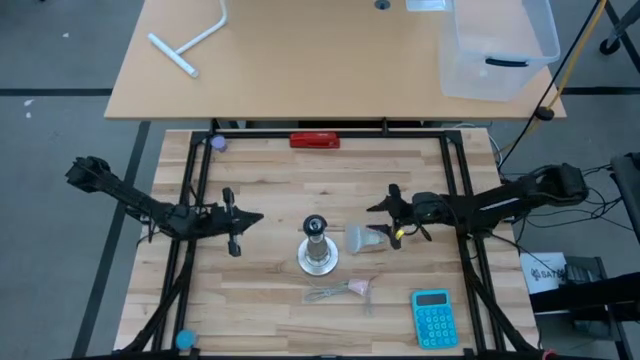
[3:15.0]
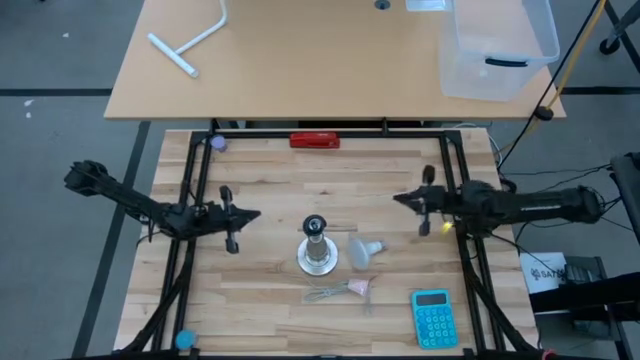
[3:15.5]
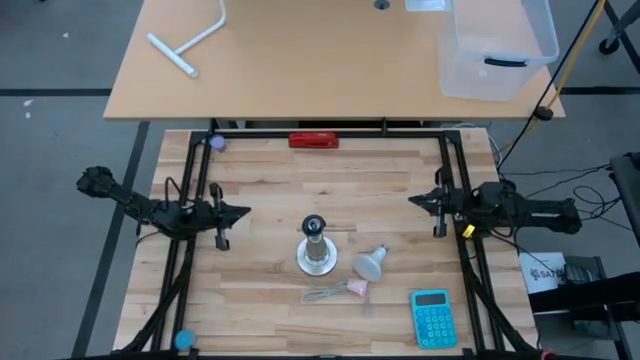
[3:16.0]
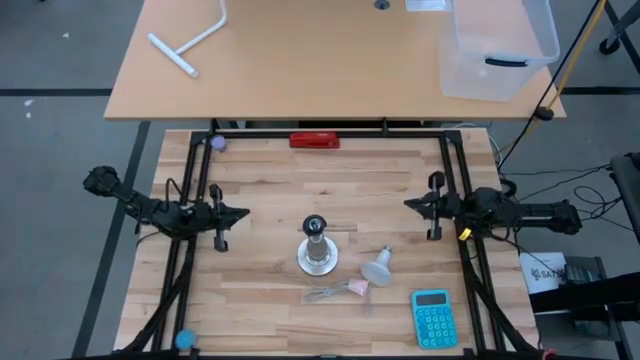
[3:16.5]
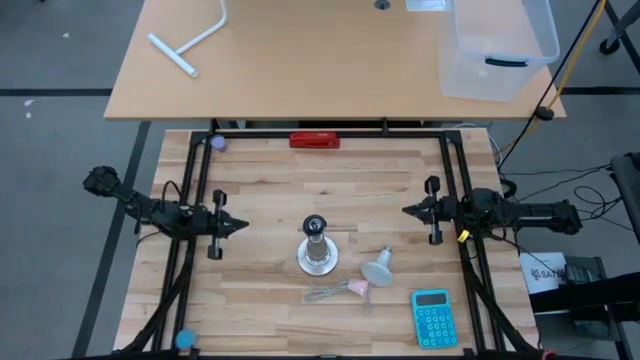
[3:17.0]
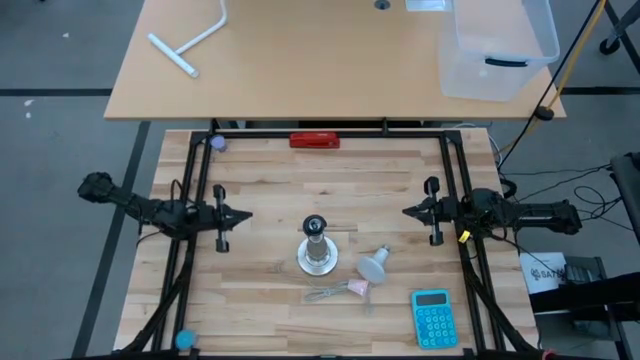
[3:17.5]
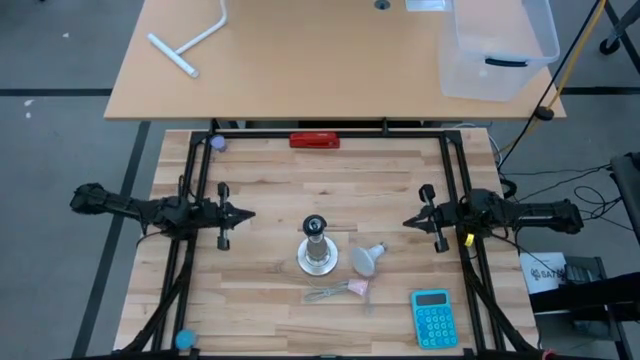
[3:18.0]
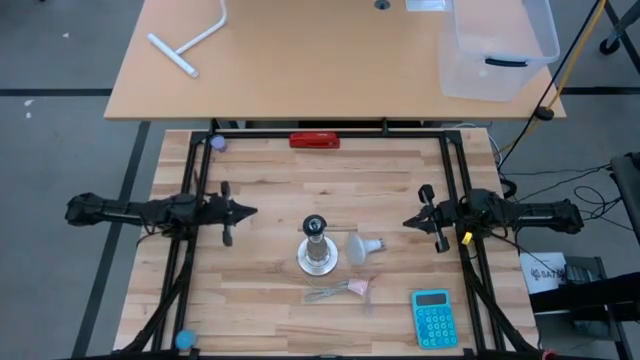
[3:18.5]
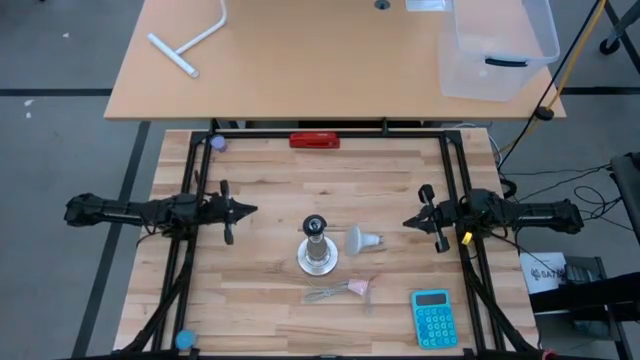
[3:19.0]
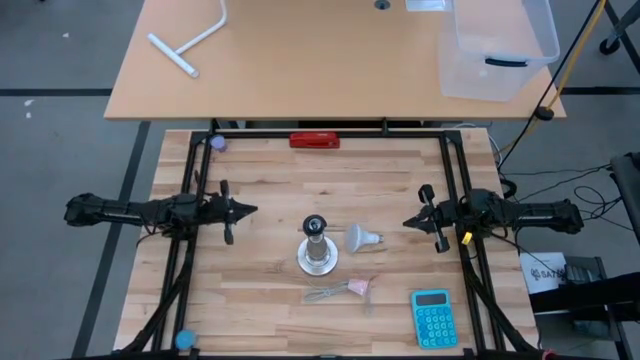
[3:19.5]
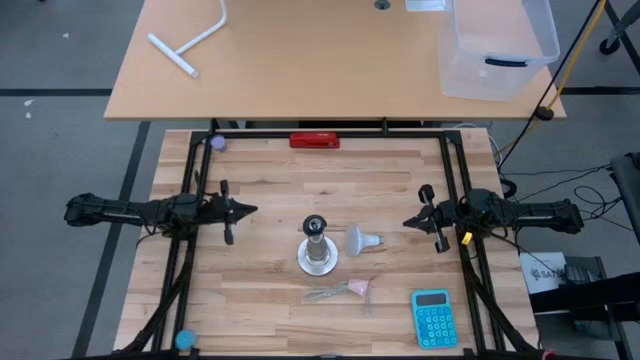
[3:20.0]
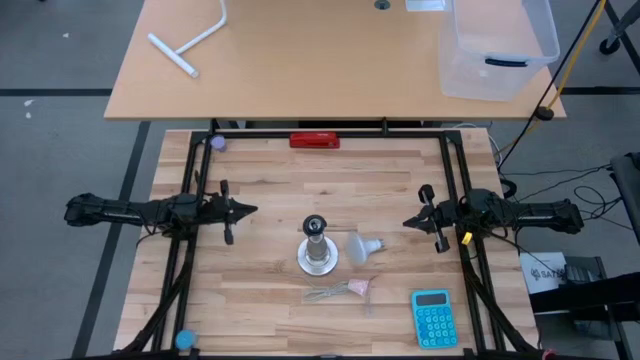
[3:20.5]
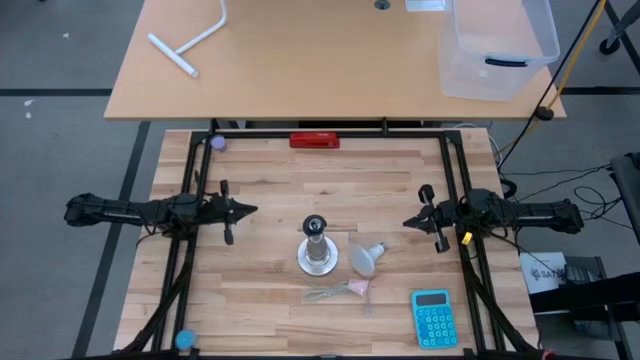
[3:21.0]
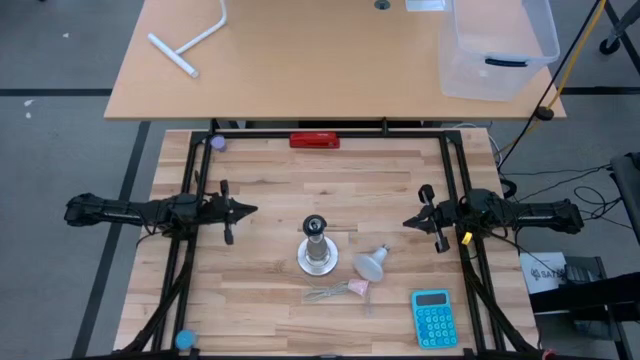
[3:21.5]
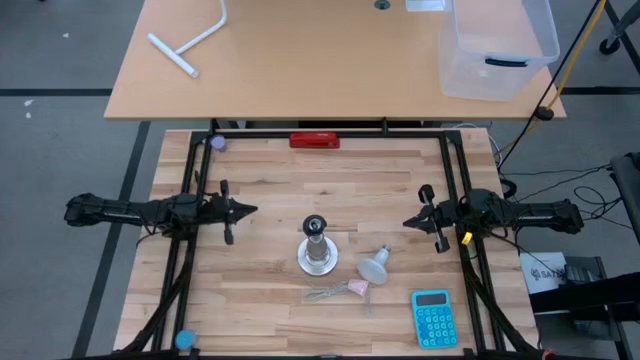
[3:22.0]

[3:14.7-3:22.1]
Task: Screw lightbulb
Return to Home Position

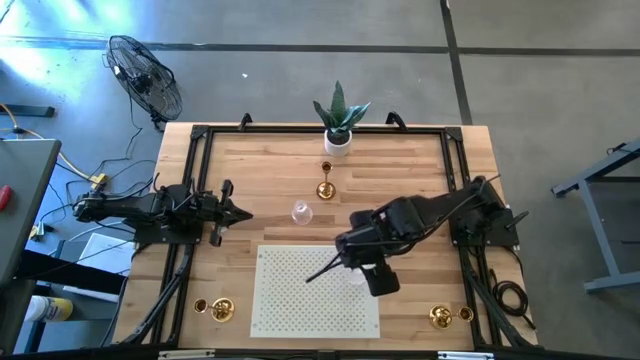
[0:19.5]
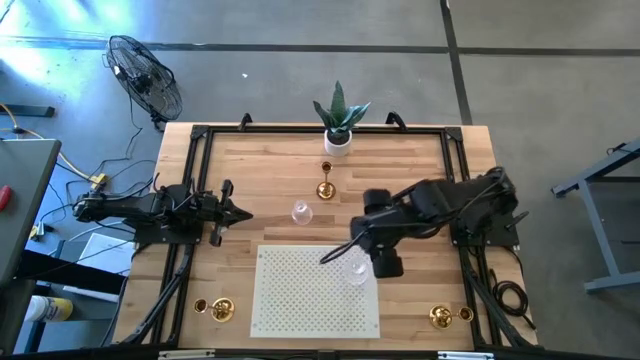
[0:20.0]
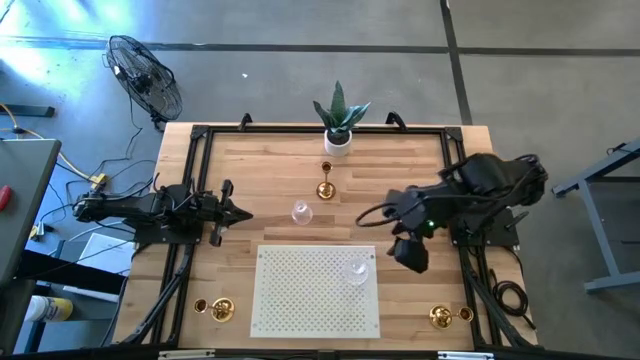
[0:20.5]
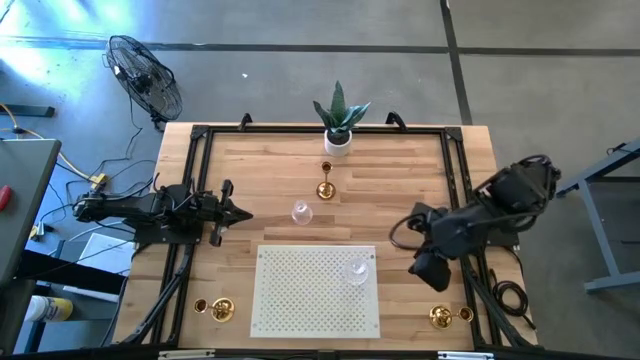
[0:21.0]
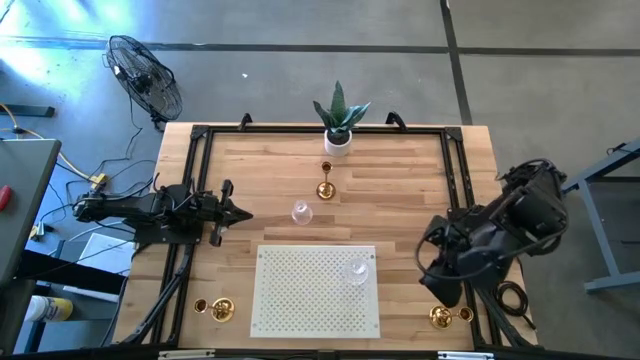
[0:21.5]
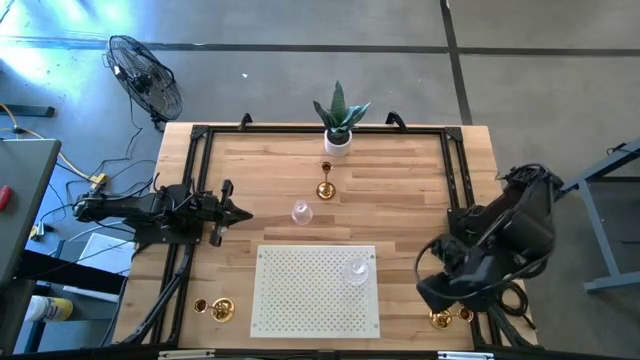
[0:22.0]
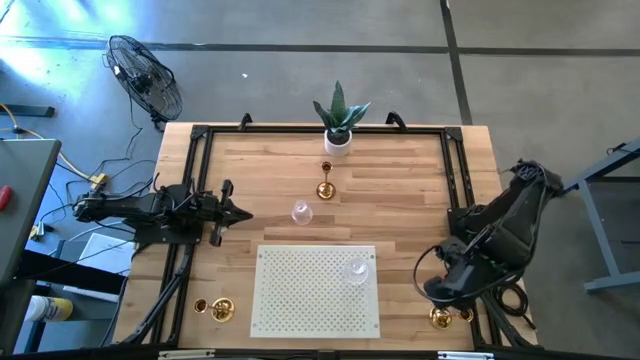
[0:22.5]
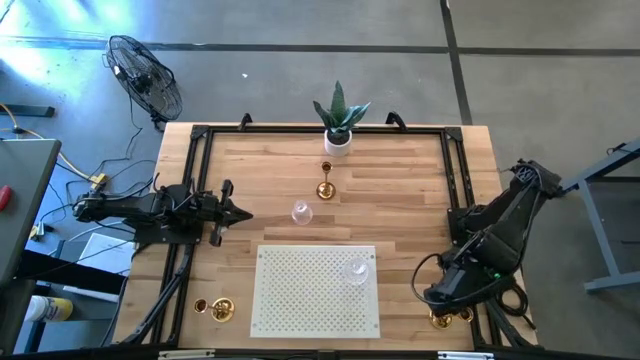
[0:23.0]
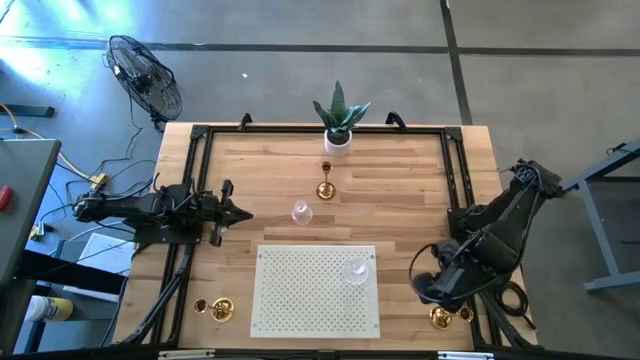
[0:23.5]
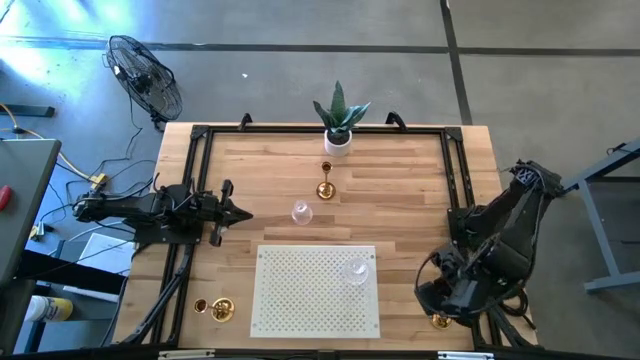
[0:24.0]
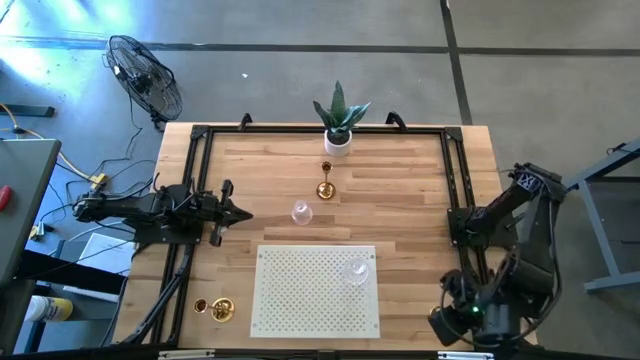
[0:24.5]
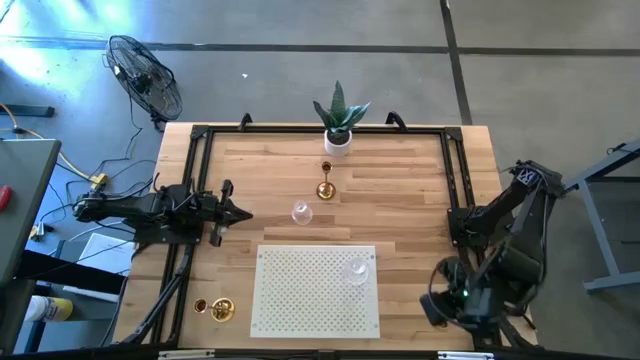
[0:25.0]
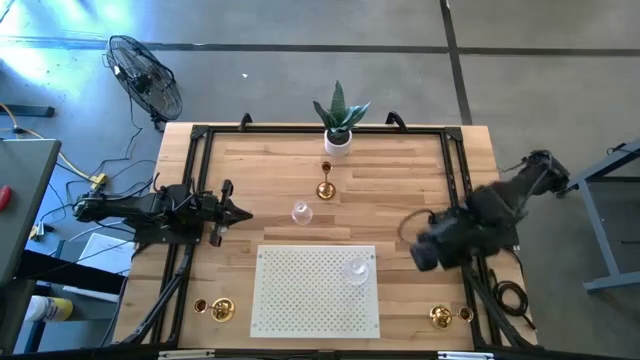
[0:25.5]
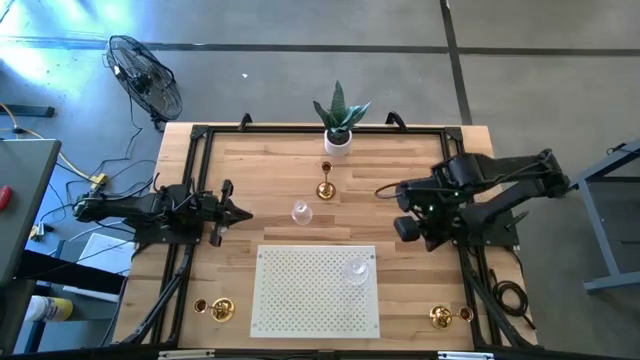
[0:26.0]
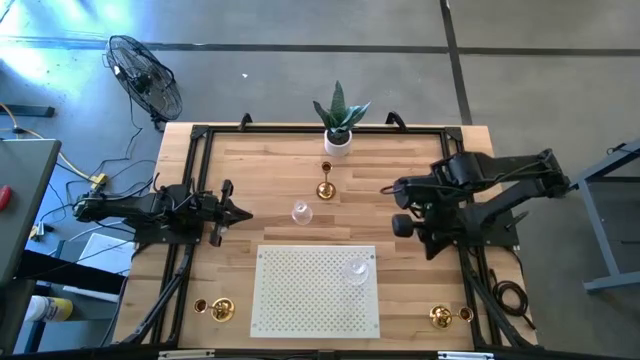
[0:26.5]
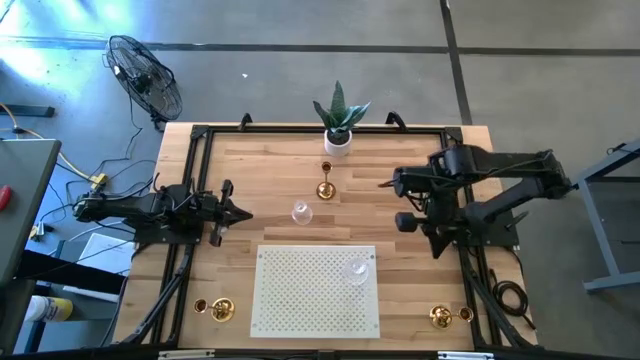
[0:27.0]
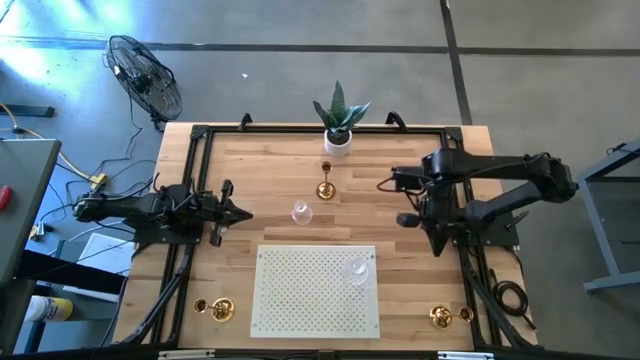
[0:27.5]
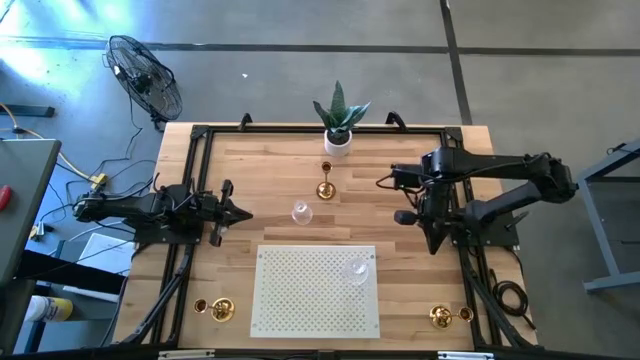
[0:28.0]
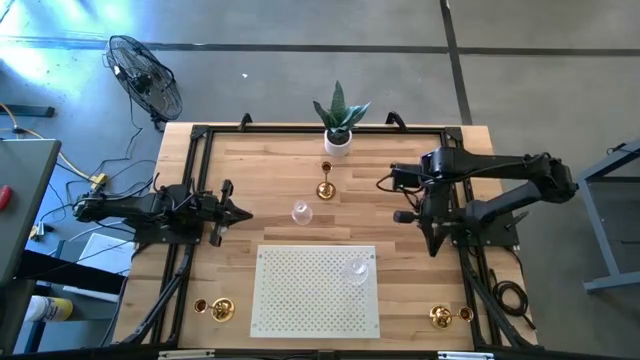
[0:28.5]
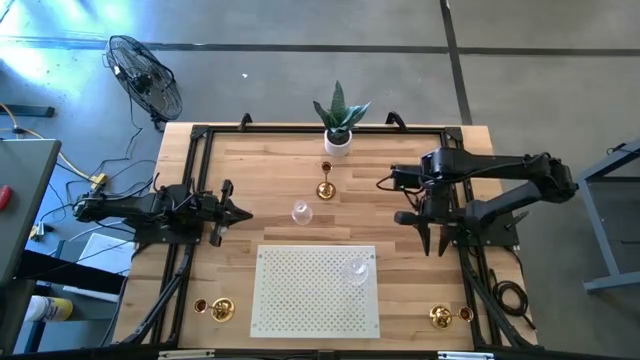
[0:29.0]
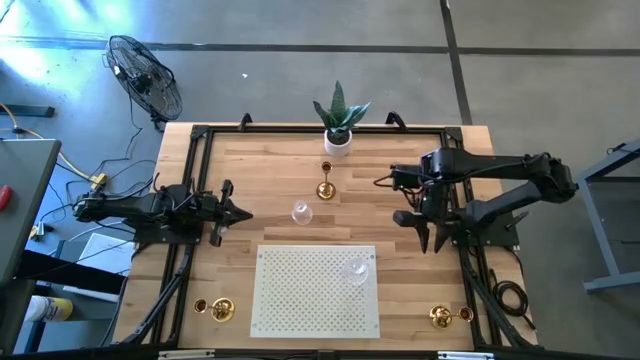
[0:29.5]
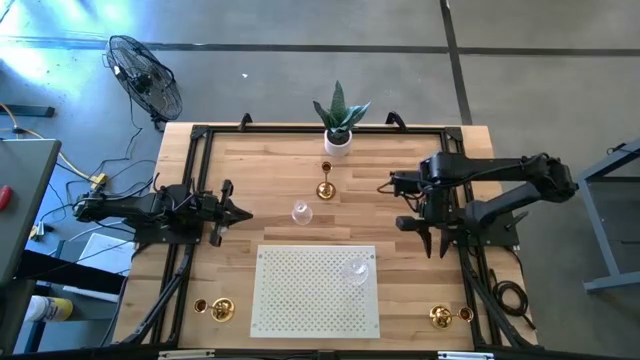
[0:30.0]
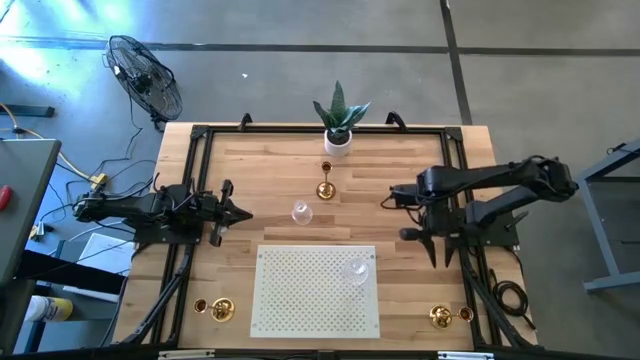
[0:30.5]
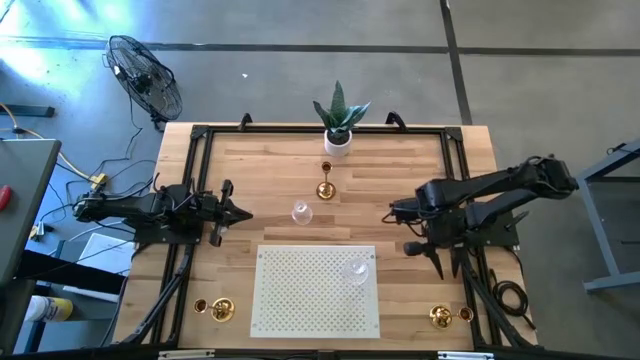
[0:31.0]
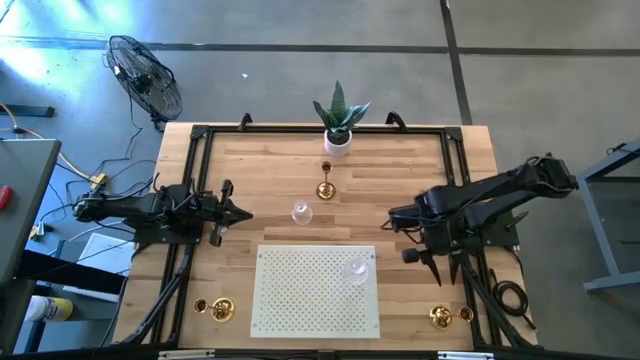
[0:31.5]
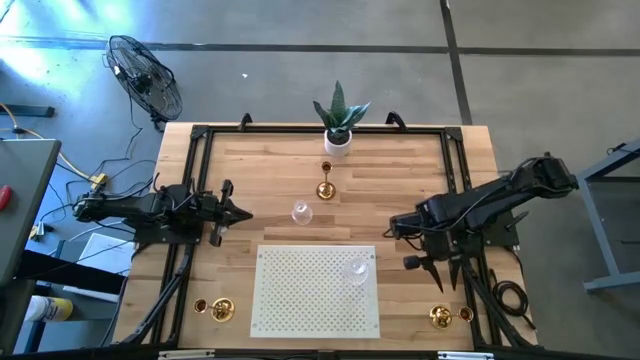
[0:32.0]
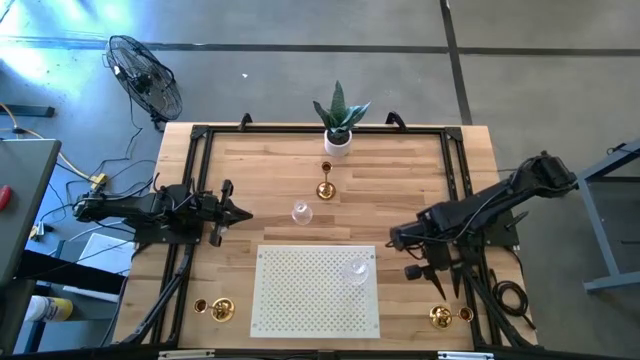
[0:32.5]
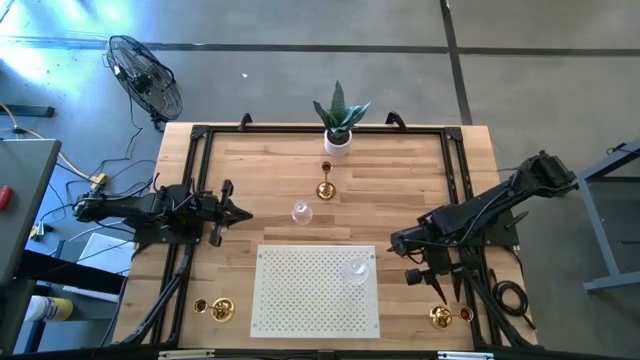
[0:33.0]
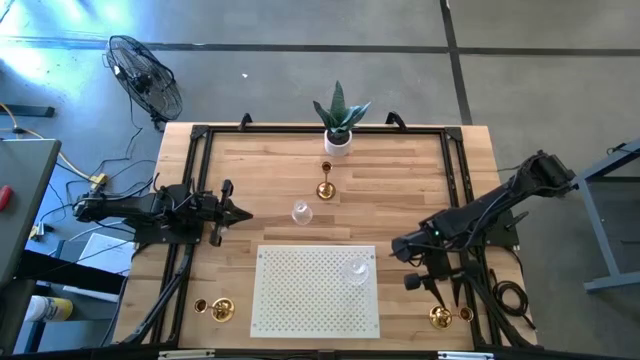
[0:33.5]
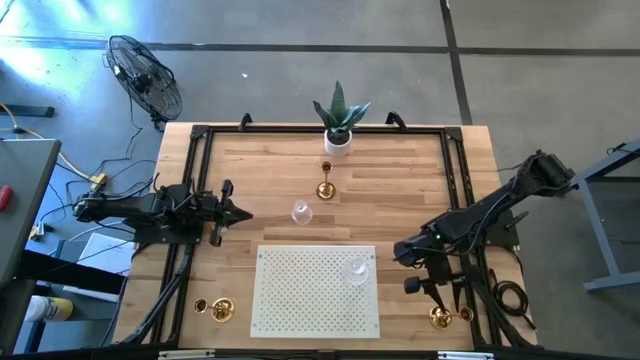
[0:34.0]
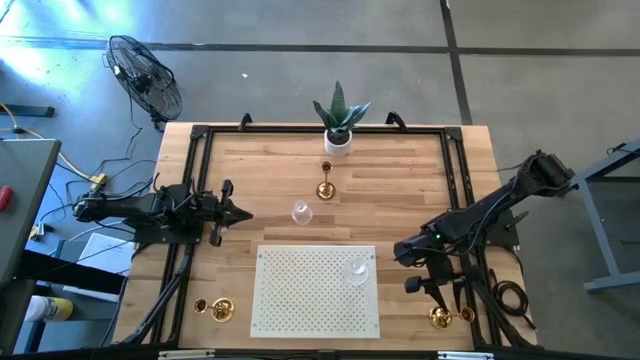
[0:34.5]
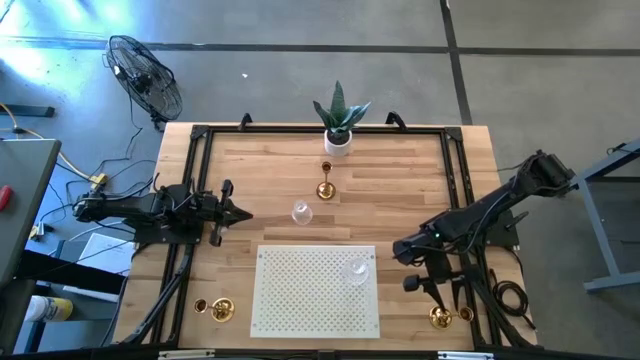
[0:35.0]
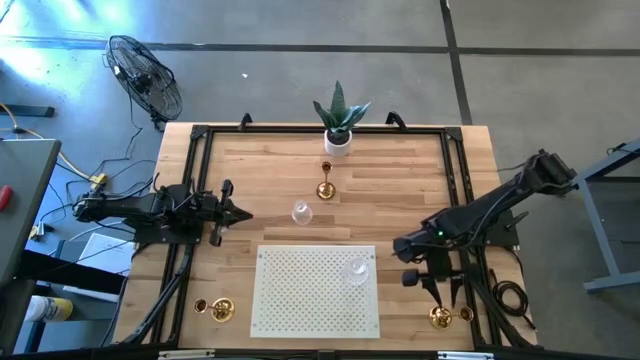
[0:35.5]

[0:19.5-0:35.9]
Task: Pick & Place candle stick holders
Put the bottom right gold candle holder on the shelf
